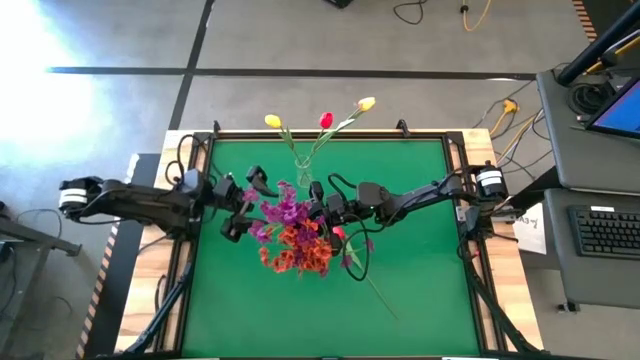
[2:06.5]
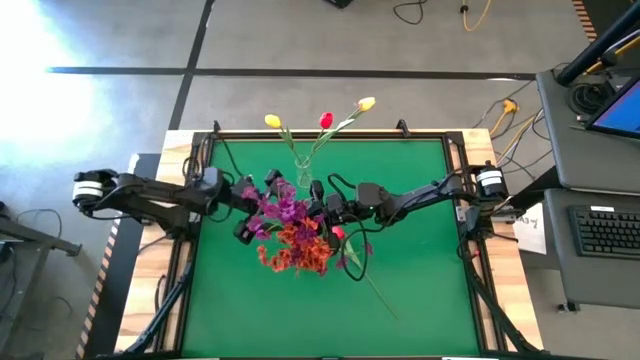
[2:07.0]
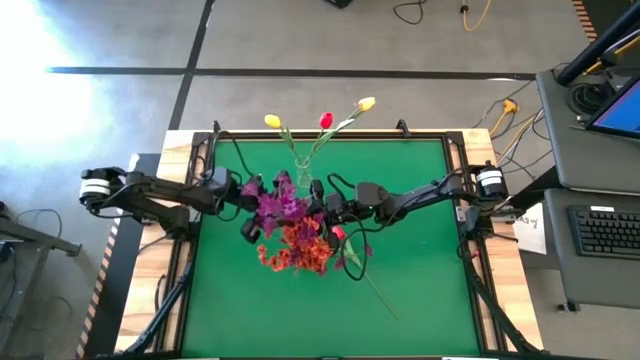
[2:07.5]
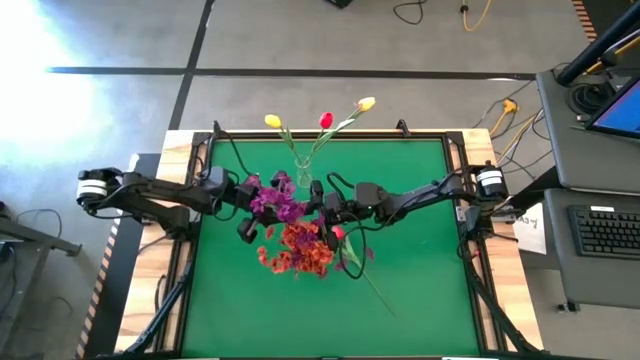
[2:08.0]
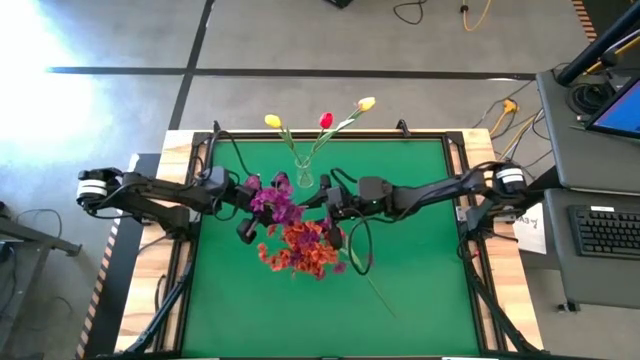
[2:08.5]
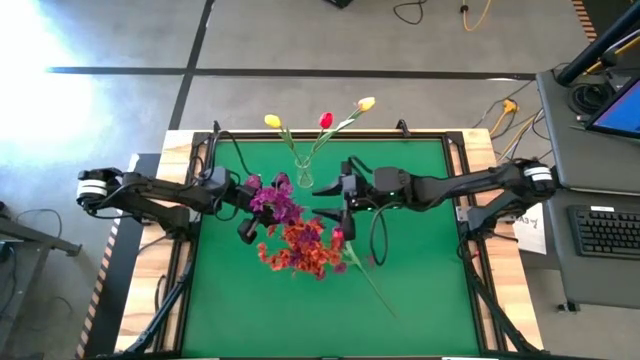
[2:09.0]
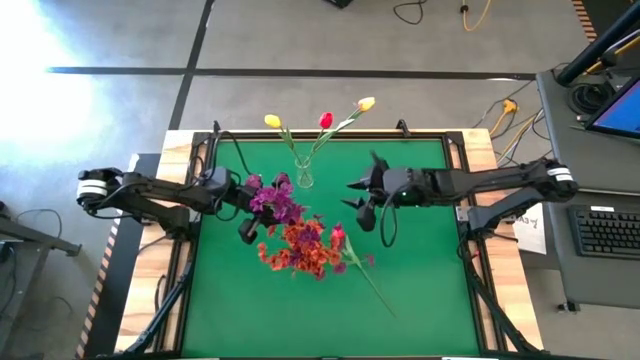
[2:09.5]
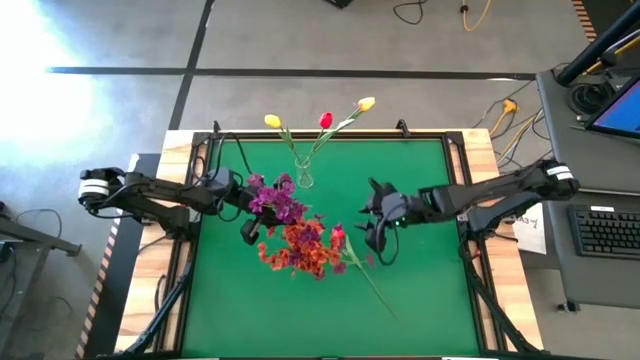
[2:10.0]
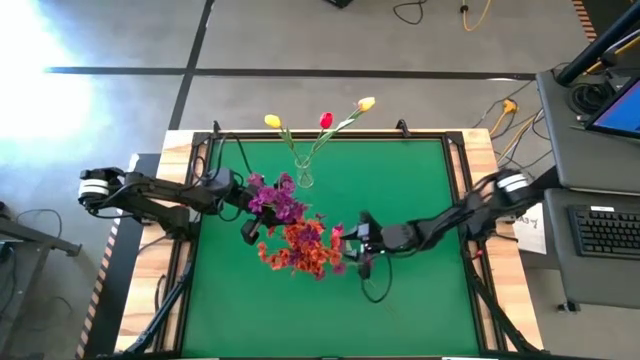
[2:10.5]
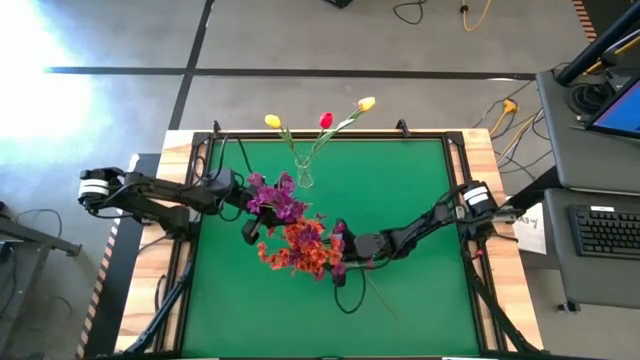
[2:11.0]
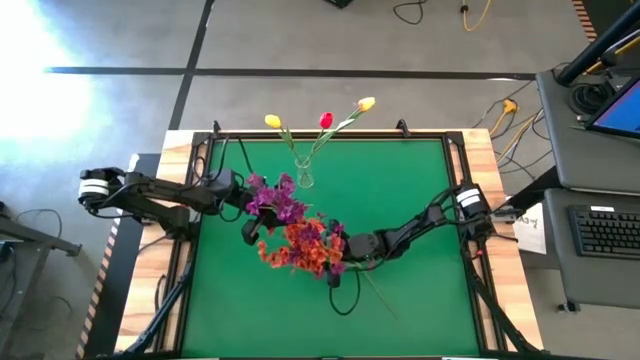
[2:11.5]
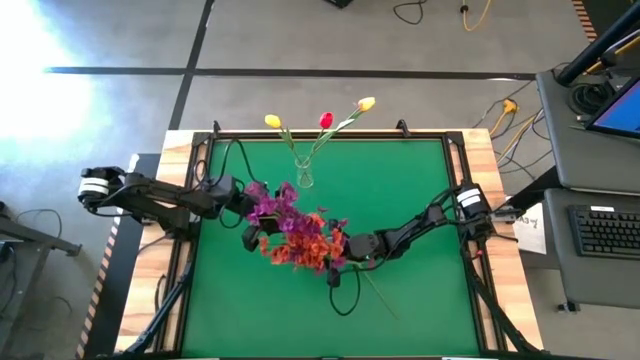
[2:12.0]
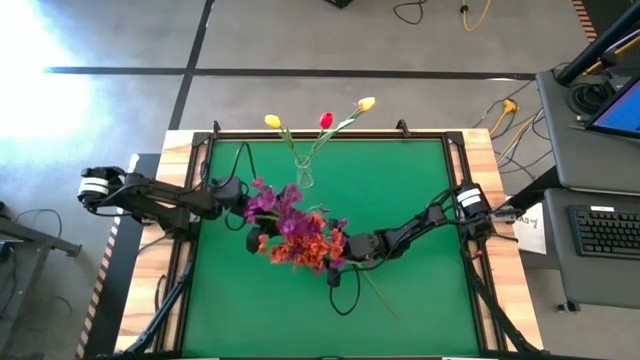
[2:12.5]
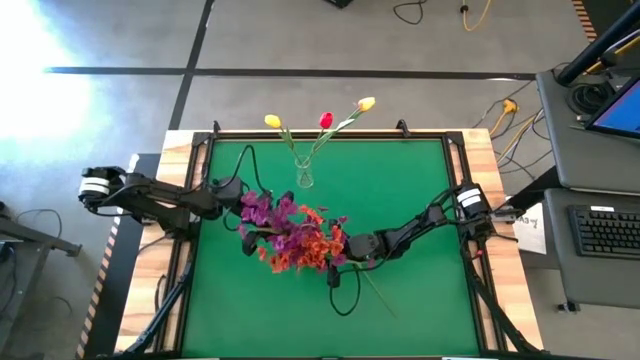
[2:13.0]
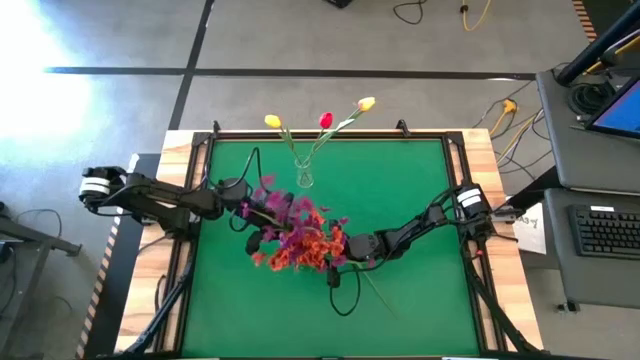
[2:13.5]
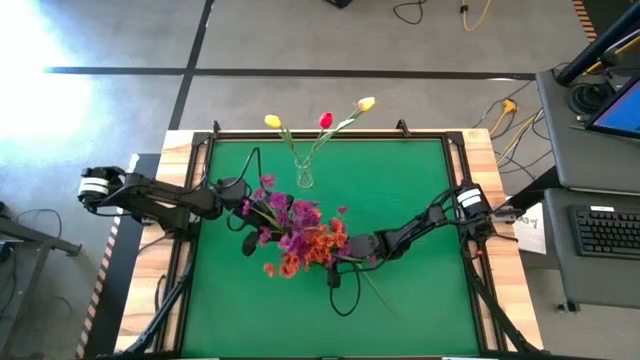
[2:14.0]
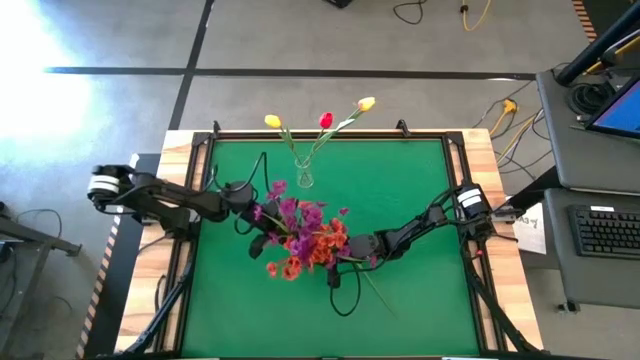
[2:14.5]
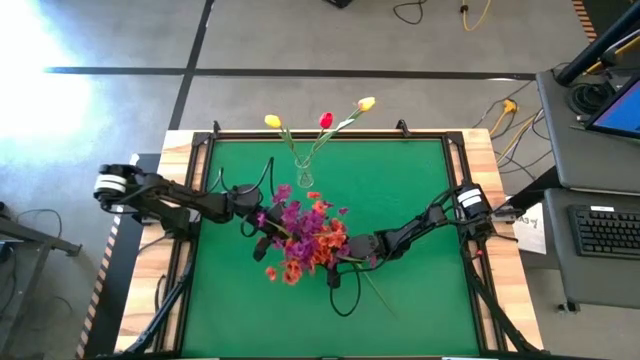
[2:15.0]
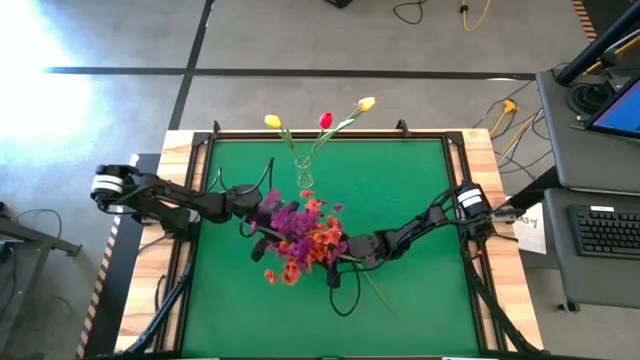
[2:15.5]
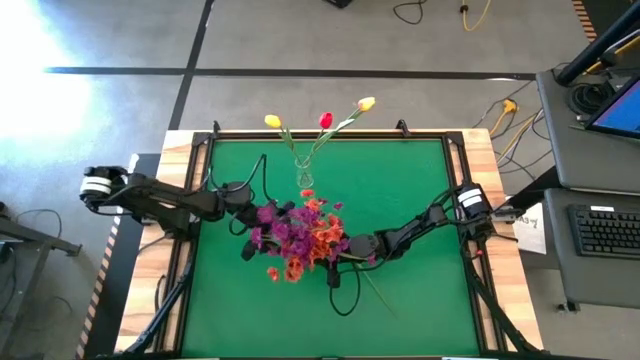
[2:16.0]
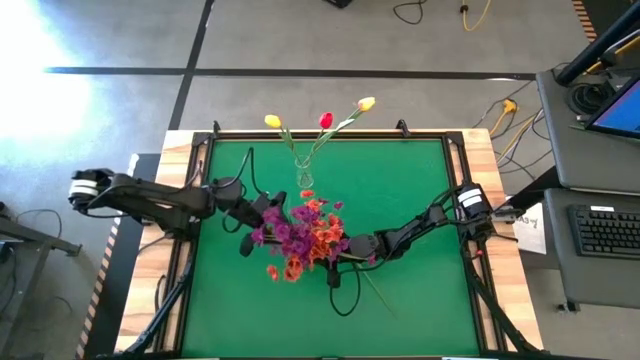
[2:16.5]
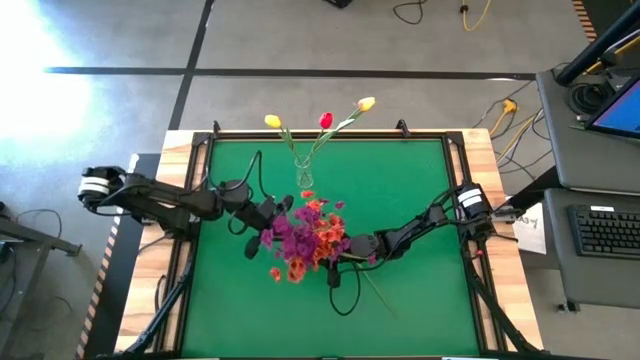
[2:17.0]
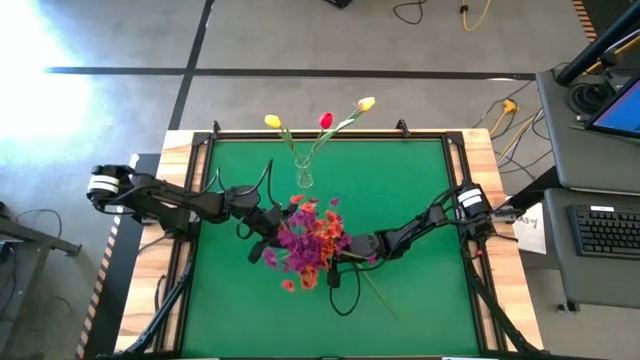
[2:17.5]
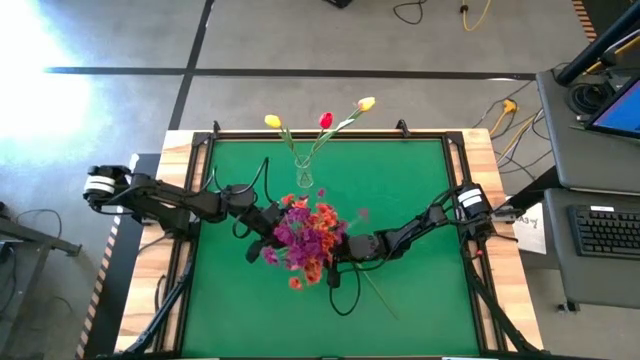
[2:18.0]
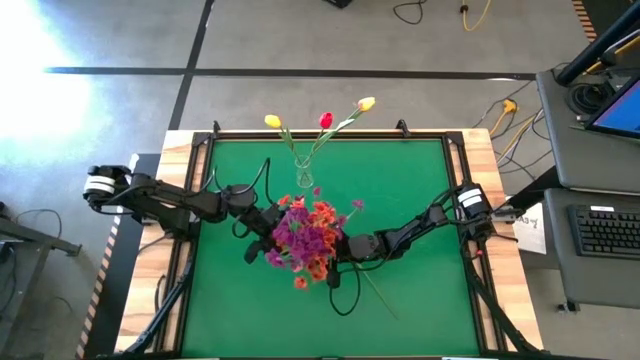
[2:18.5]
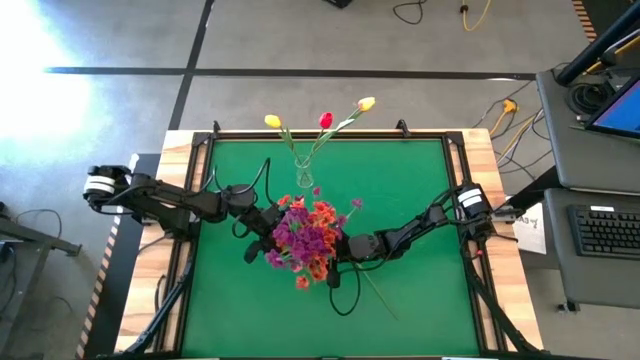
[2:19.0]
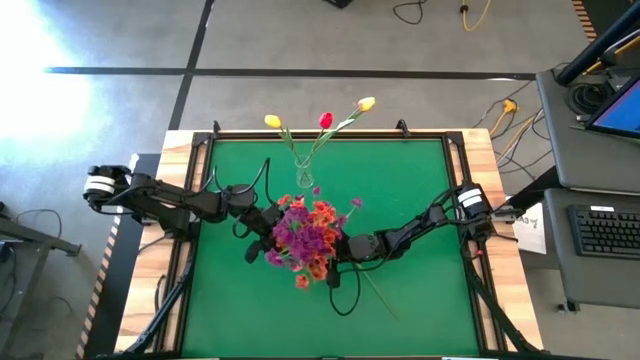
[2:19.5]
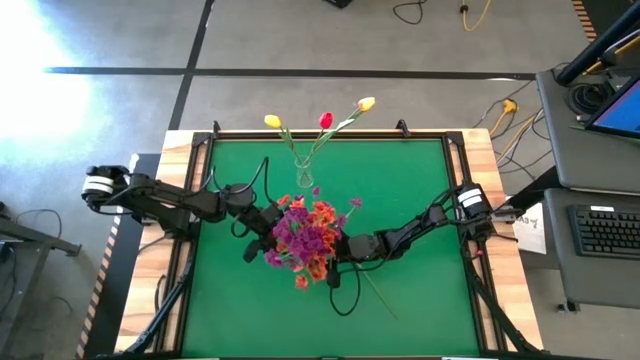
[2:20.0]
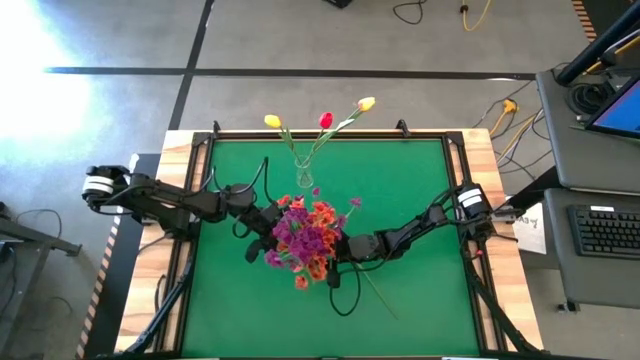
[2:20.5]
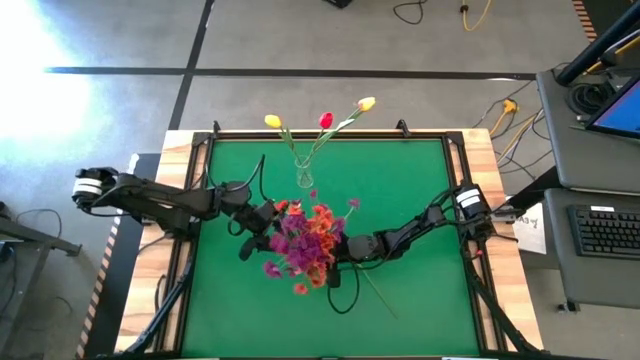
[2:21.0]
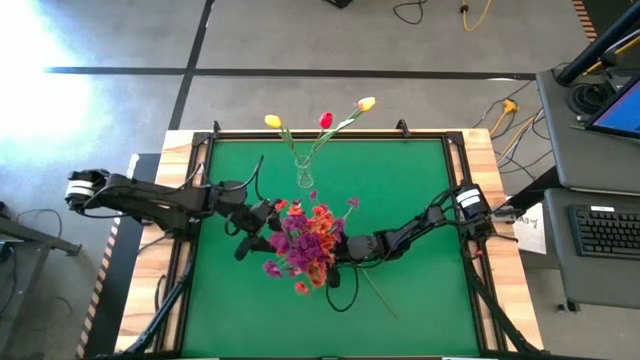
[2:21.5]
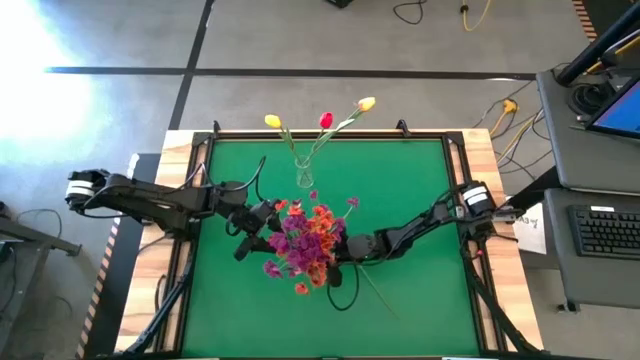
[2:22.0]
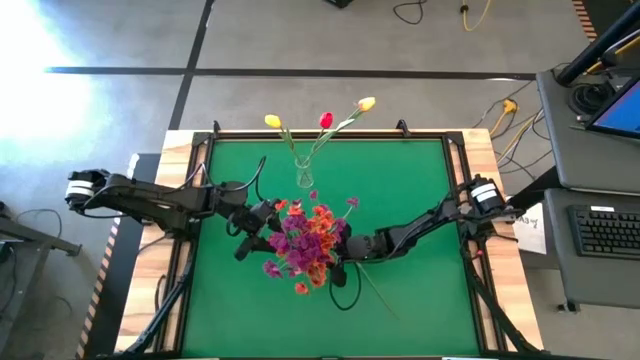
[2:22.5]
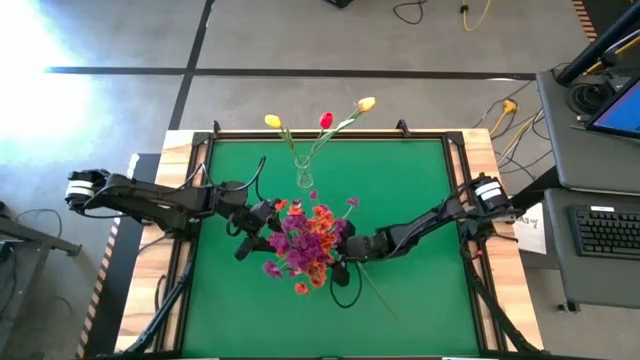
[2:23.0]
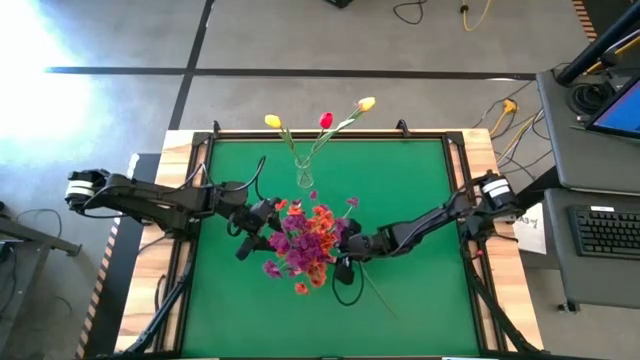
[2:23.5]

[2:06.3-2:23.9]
Task: Sort flowers into vase by color
Put the violet flowers into the green vase

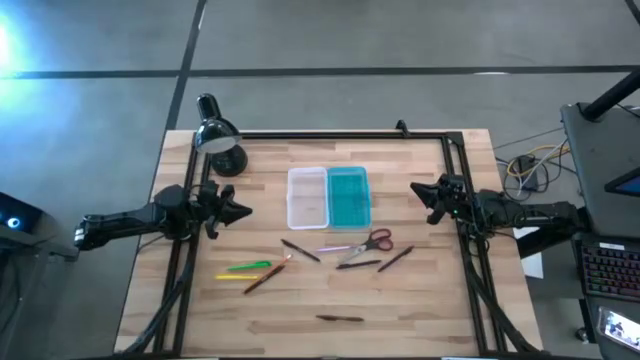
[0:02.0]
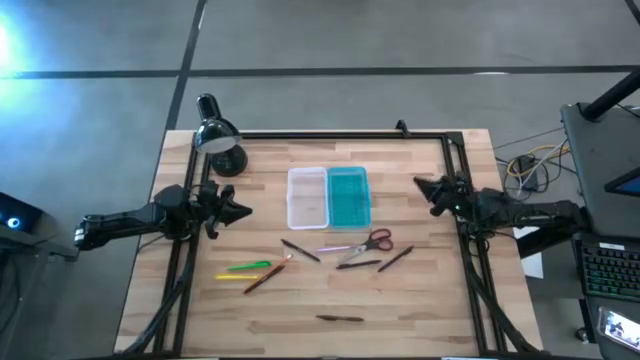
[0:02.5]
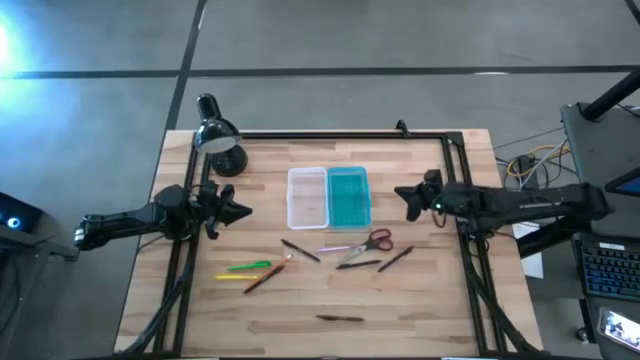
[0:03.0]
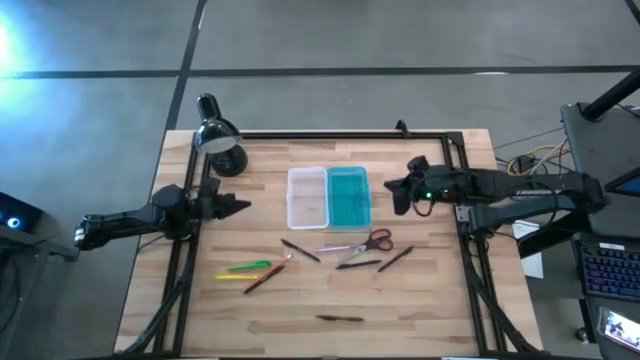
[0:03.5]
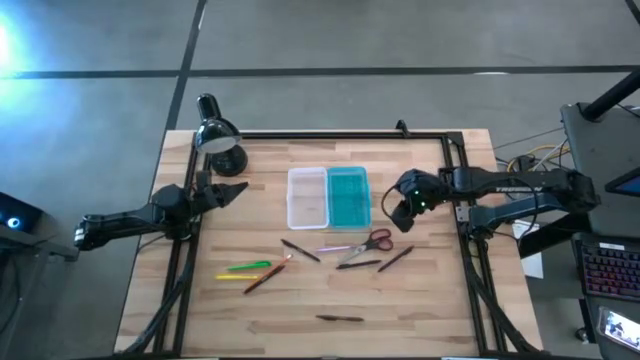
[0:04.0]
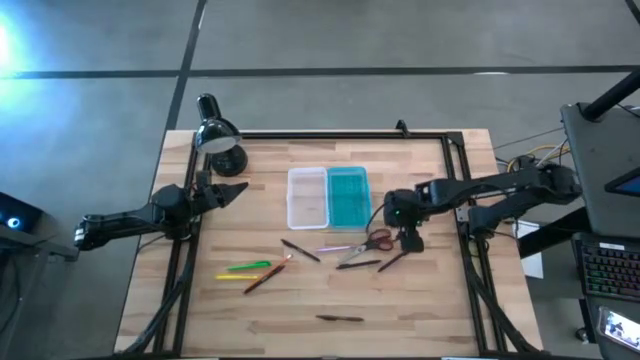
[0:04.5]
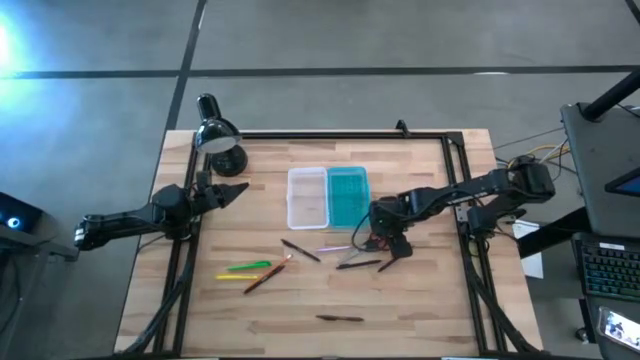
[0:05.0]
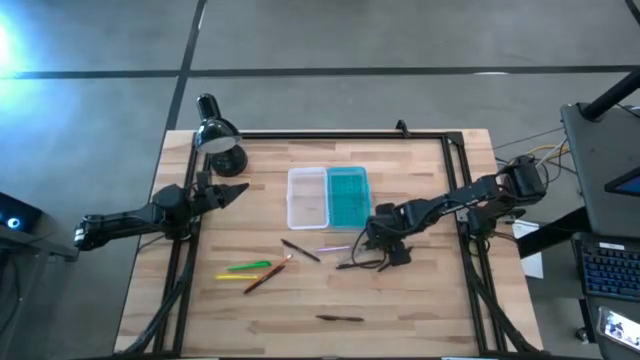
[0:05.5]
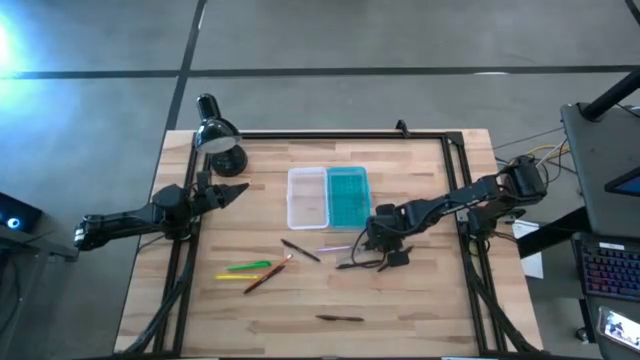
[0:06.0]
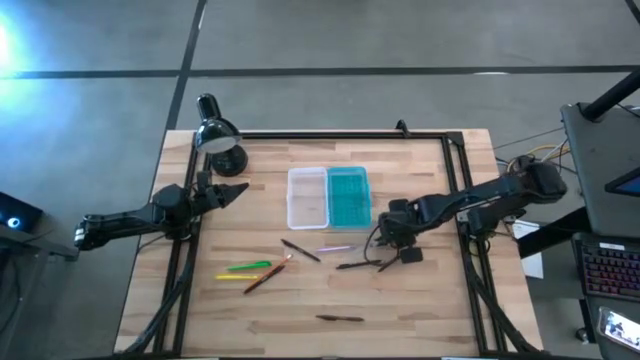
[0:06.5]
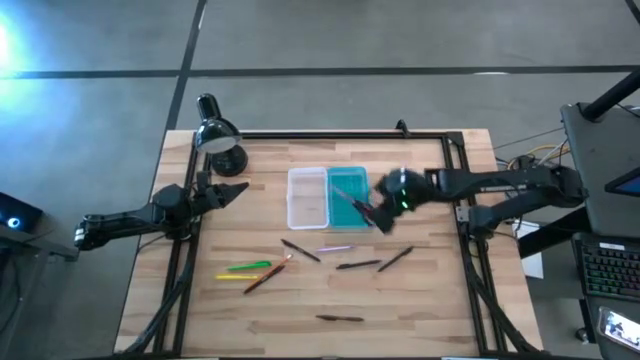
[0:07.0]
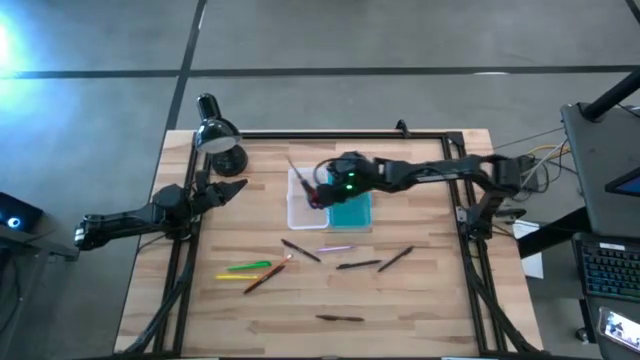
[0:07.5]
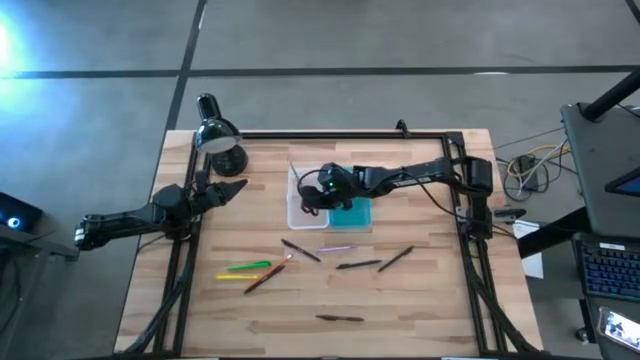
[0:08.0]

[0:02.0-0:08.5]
Task: Pick & place school supplies into a supply box
Put the scissors into the supply box
